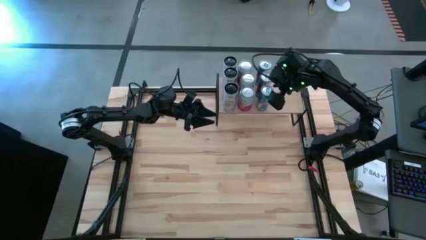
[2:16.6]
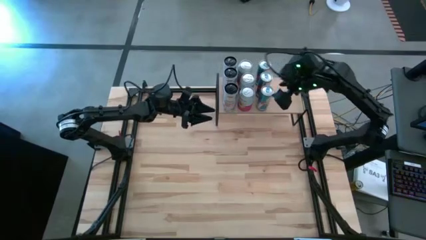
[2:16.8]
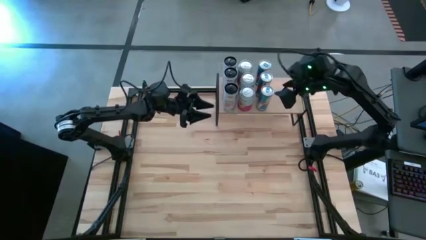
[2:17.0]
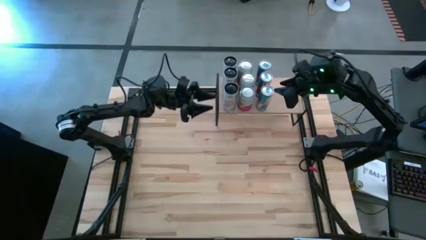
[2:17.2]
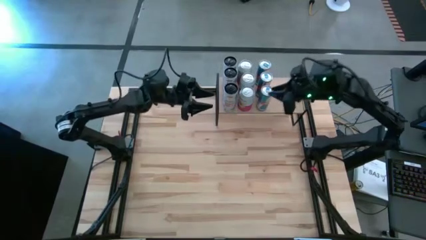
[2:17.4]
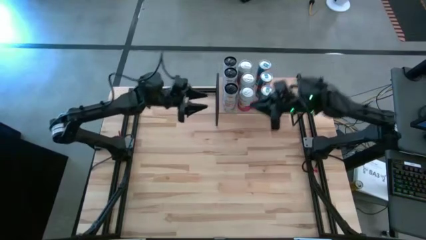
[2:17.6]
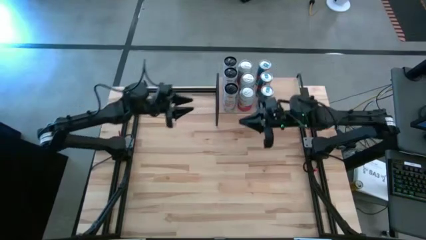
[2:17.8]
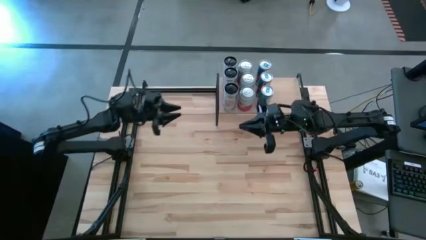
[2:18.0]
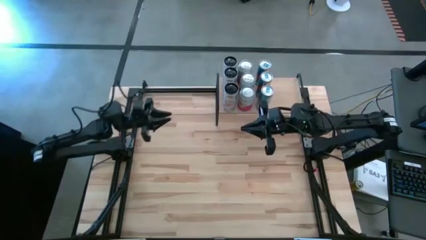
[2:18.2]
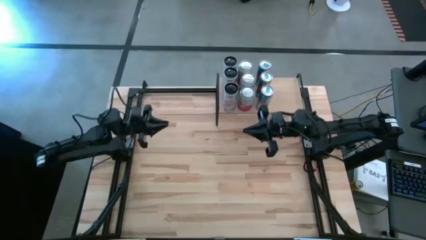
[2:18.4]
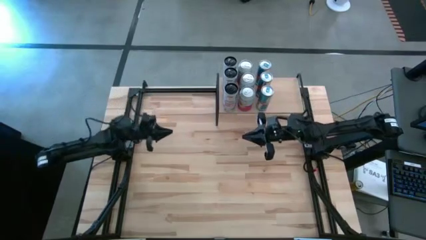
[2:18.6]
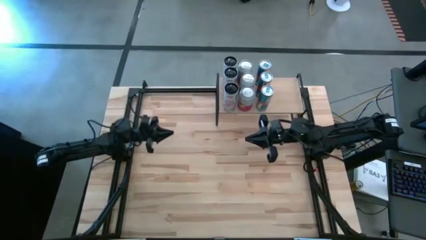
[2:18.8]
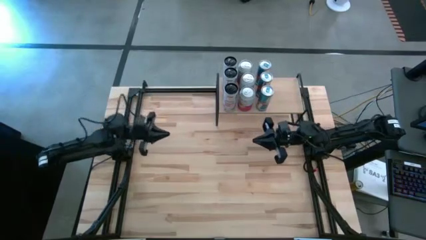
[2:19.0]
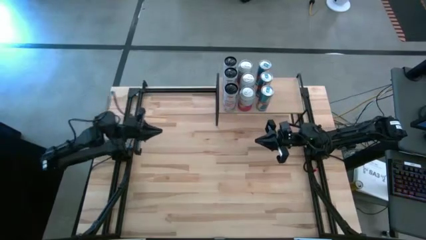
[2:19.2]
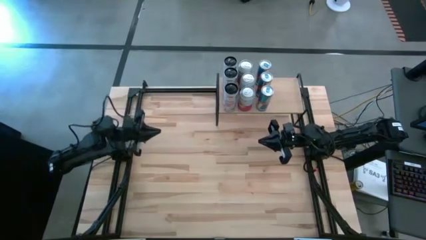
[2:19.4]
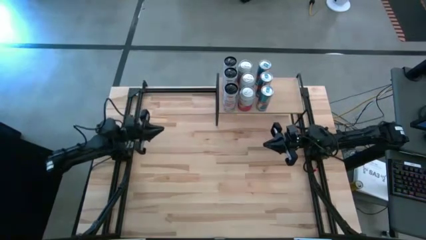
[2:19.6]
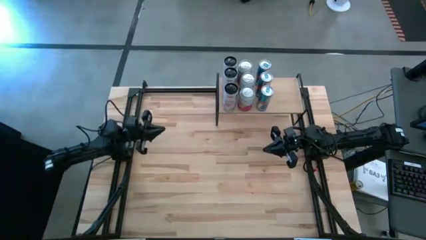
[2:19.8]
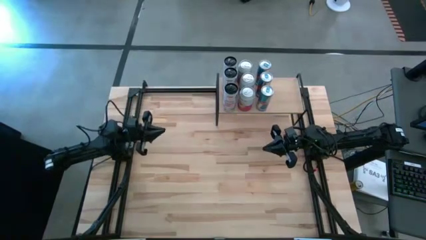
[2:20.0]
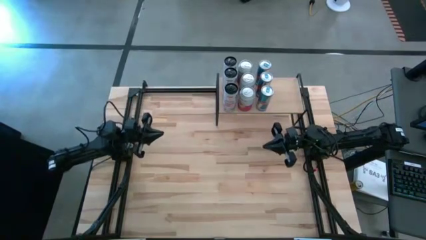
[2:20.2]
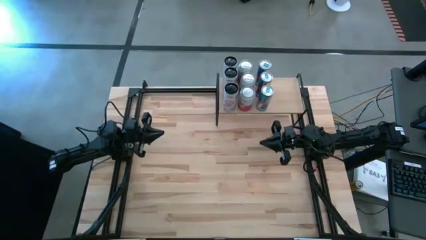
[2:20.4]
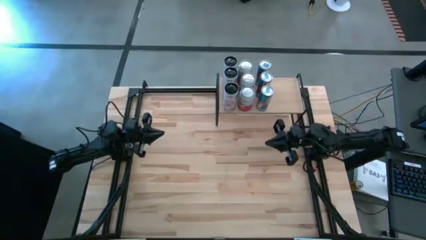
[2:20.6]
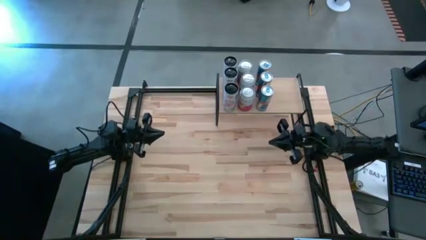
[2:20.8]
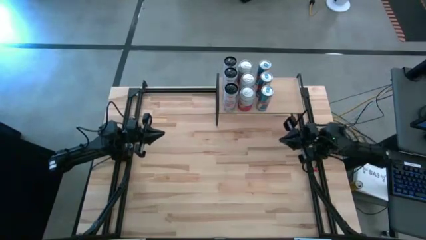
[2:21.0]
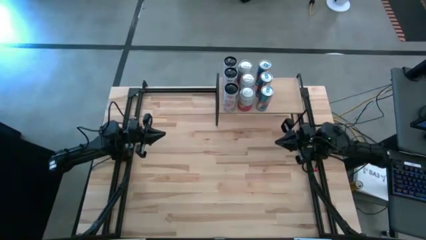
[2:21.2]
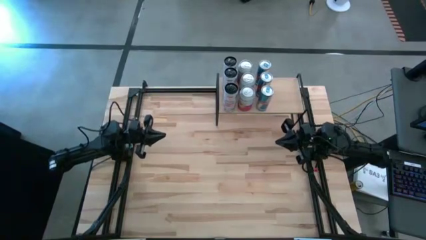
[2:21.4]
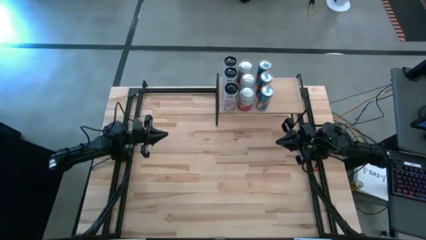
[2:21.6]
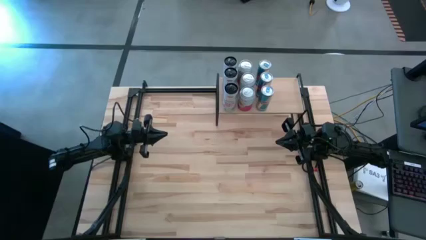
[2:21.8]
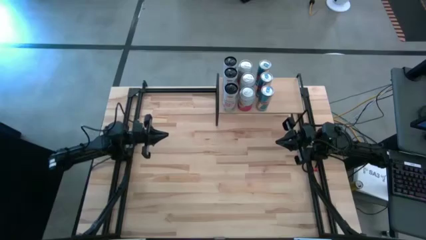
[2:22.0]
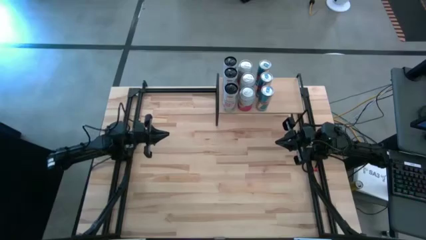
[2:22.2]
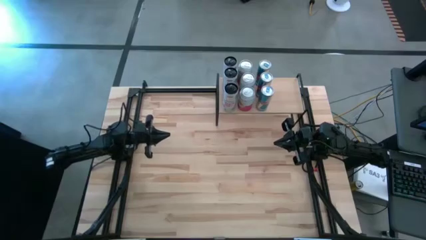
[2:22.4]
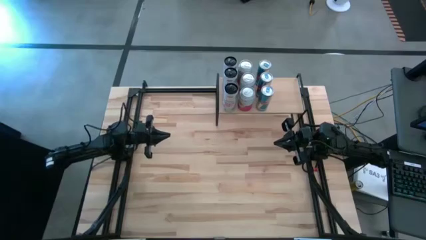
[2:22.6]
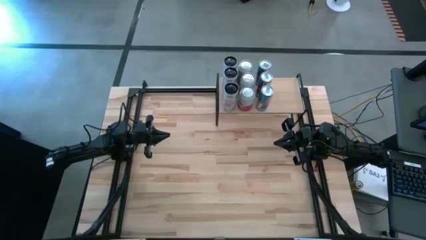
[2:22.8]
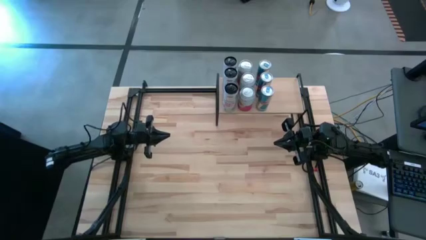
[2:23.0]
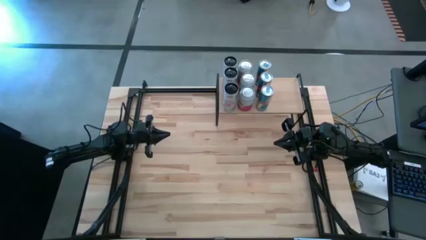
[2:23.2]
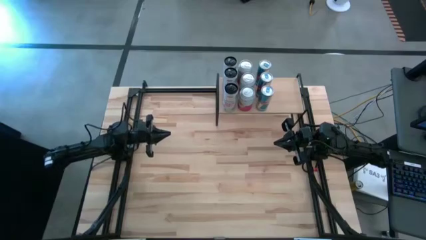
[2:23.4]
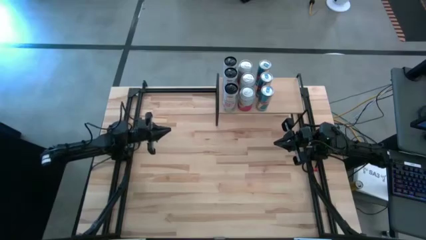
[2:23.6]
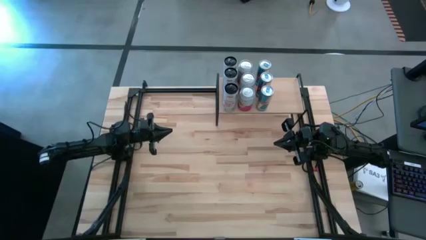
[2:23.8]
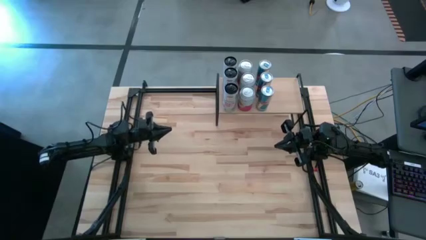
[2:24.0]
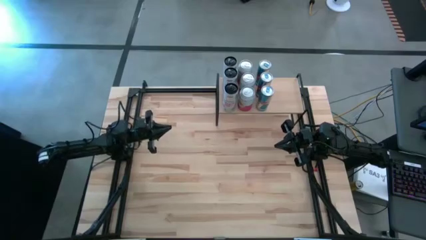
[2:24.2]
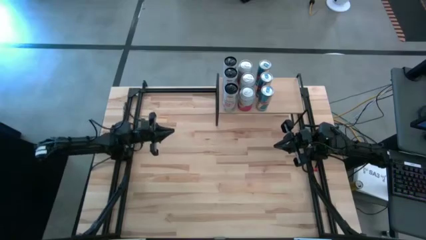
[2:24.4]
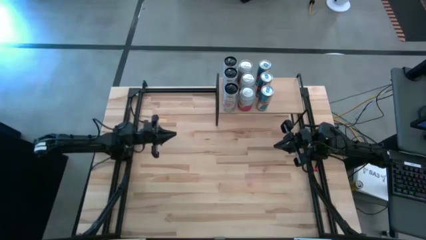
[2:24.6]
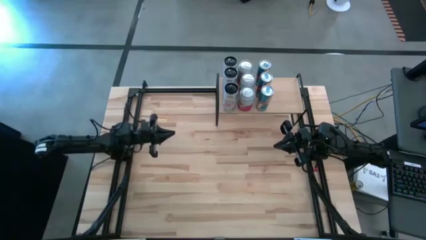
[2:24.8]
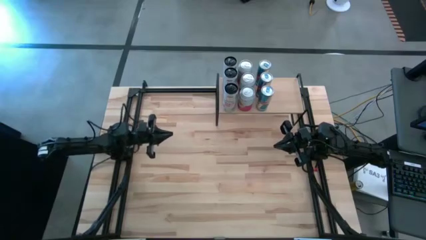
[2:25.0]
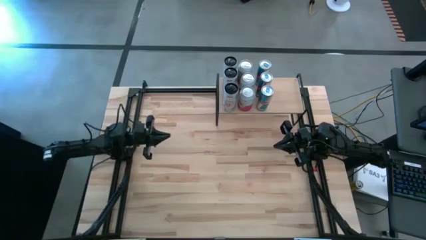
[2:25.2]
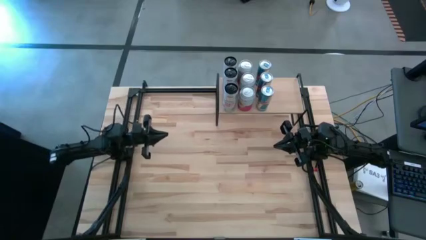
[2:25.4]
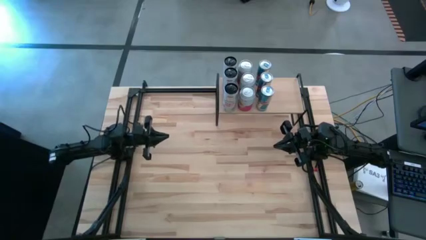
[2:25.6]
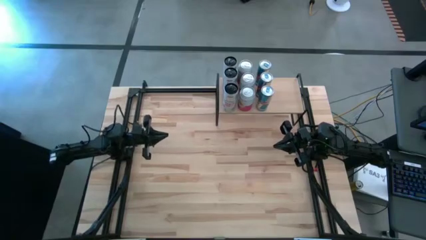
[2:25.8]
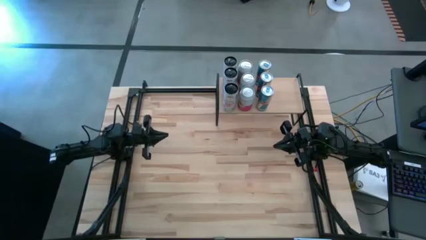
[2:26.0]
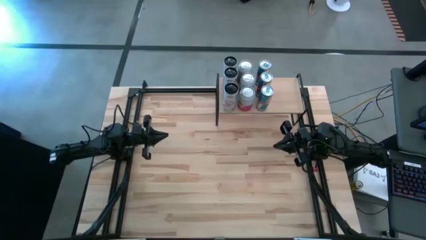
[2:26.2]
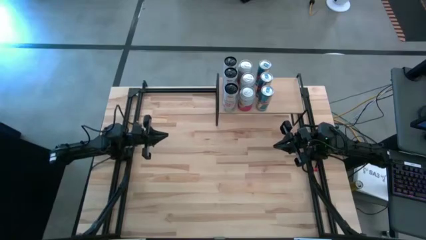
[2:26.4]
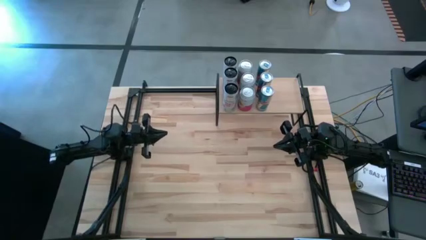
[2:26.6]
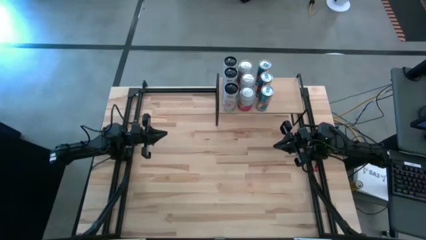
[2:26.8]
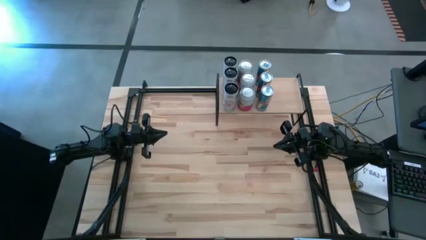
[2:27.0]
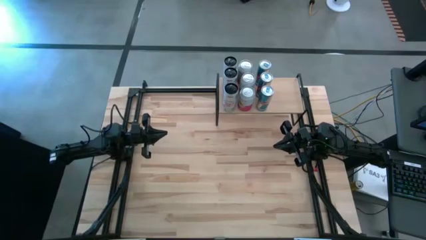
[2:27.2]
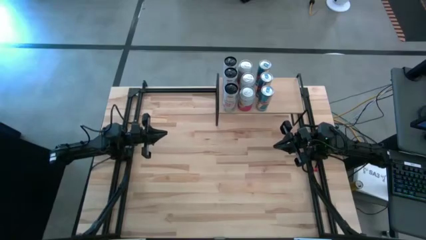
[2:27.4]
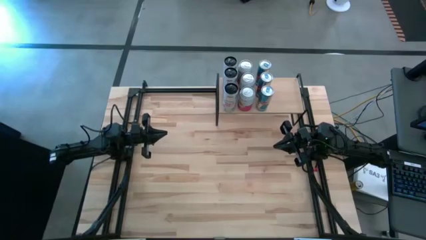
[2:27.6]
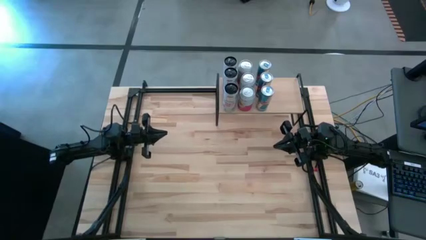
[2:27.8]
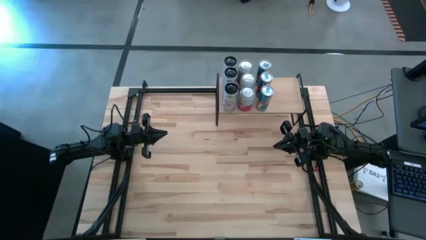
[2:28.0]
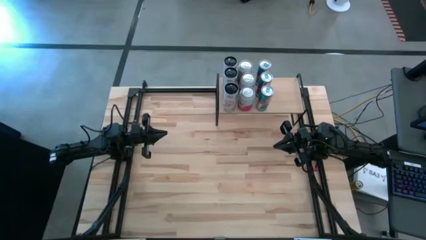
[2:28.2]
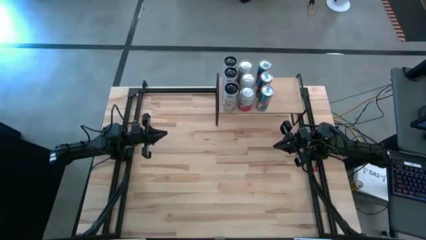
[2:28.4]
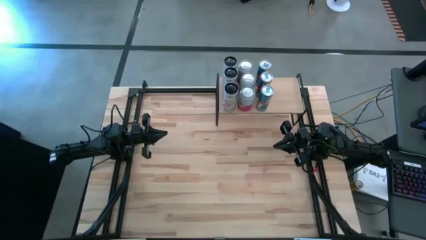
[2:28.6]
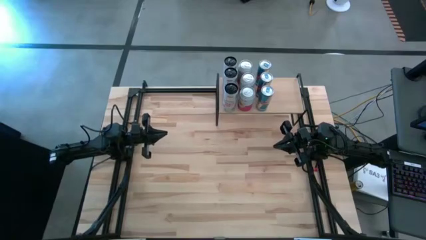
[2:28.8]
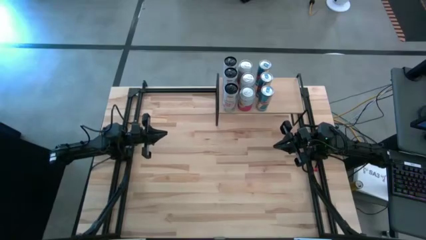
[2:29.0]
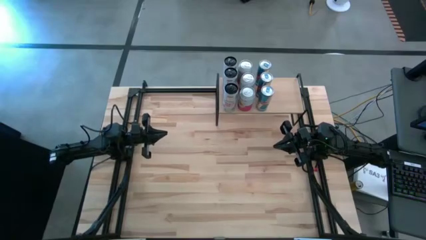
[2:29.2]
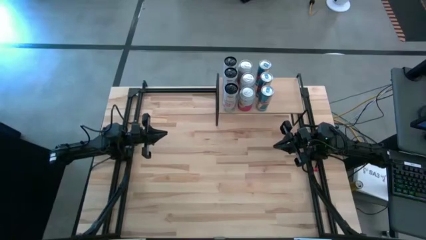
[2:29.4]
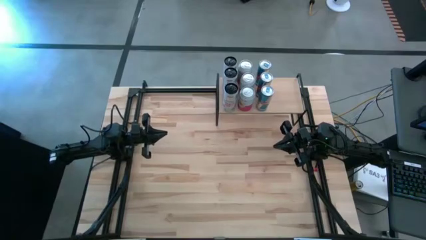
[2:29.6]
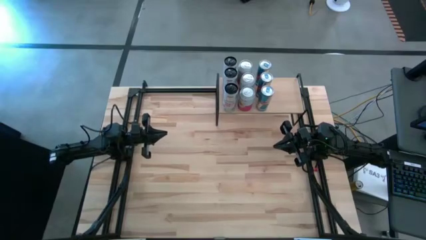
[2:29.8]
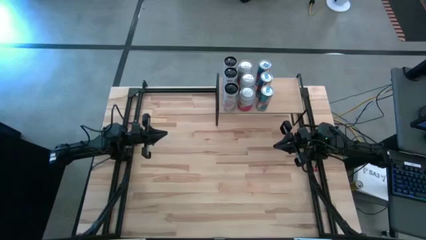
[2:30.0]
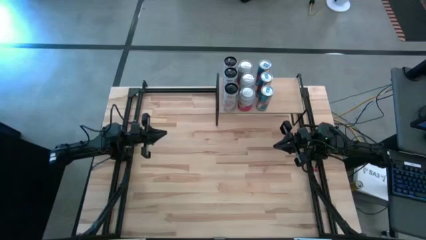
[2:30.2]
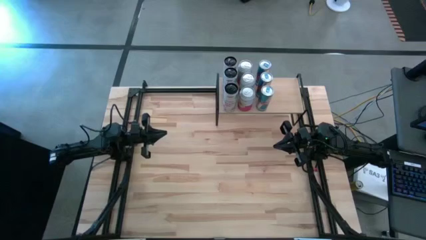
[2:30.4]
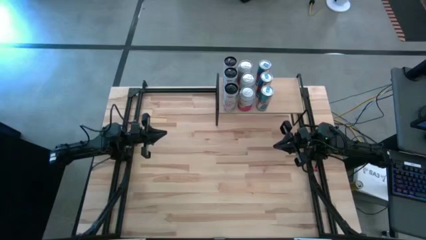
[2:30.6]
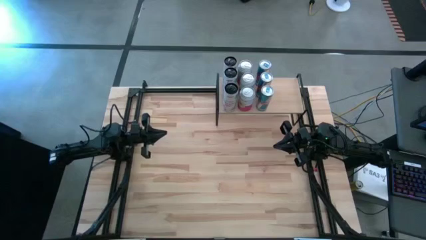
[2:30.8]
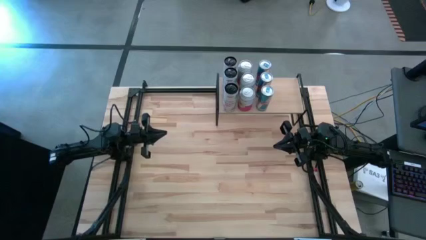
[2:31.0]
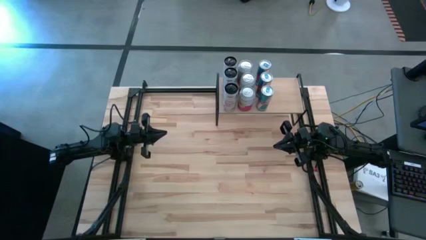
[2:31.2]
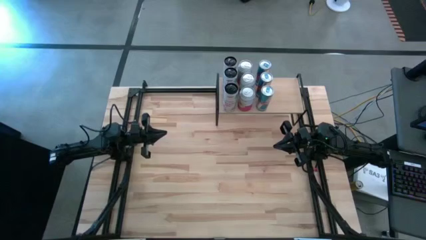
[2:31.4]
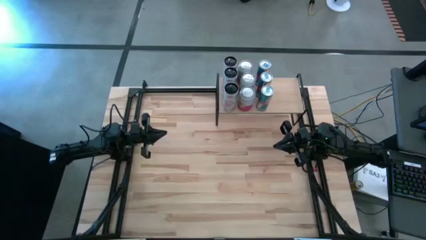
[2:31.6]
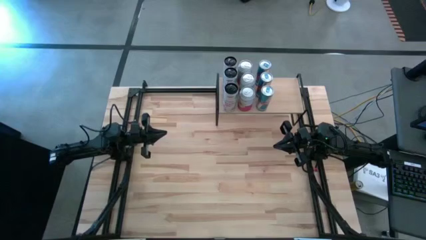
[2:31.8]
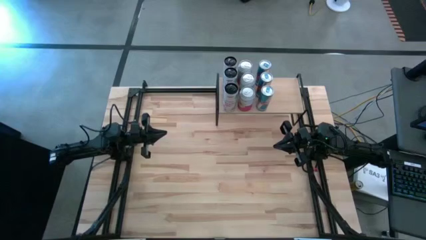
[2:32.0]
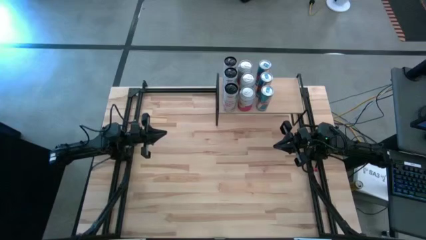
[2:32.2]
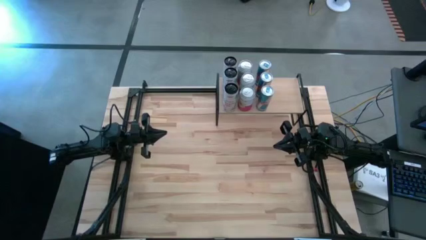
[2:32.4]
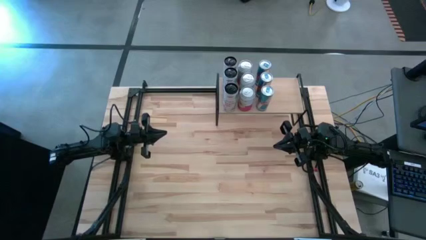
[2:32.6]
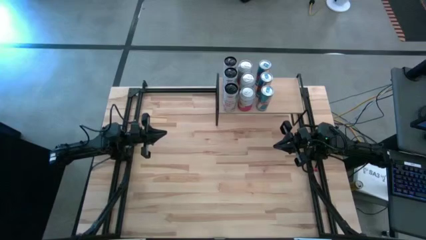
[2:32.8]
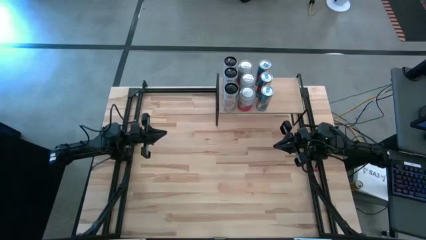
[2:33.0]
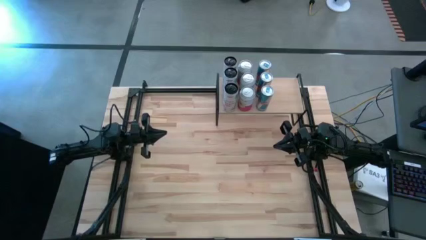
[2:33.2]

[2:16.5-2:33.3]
Task: Place canned beverage on shelf
Return to Home Position
